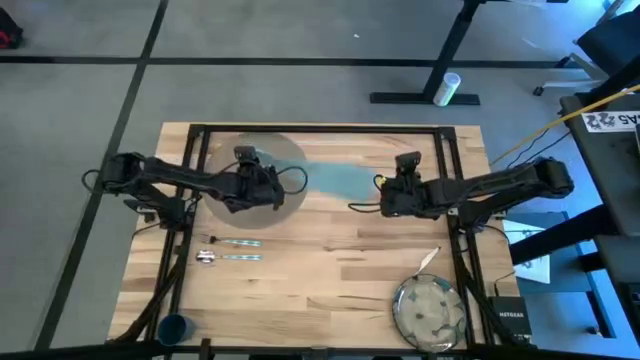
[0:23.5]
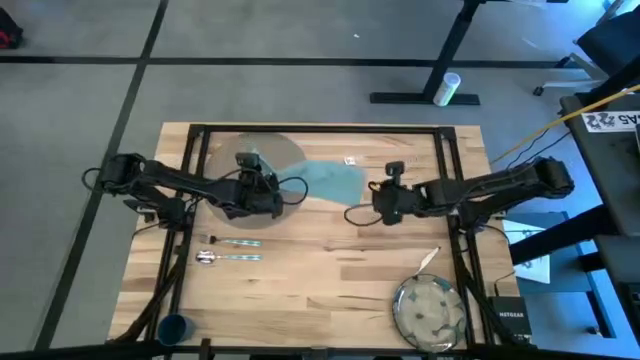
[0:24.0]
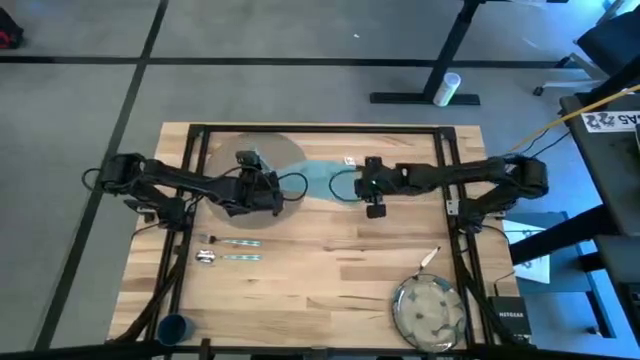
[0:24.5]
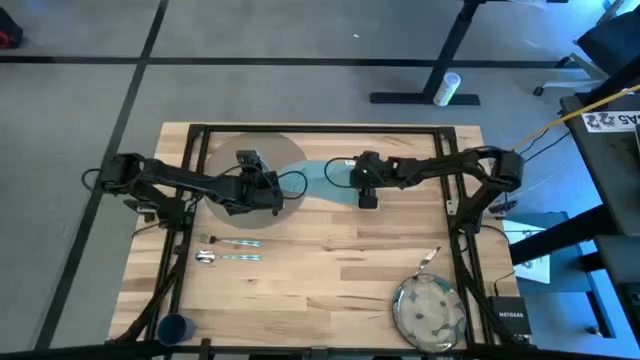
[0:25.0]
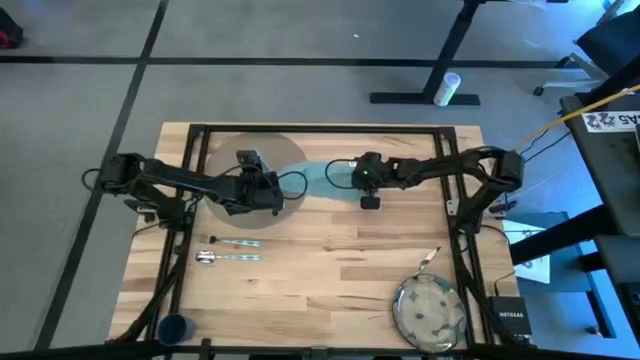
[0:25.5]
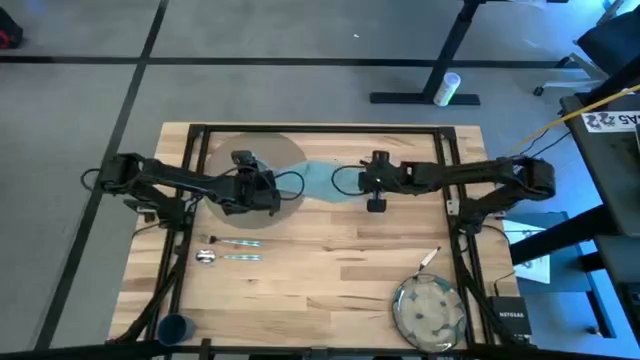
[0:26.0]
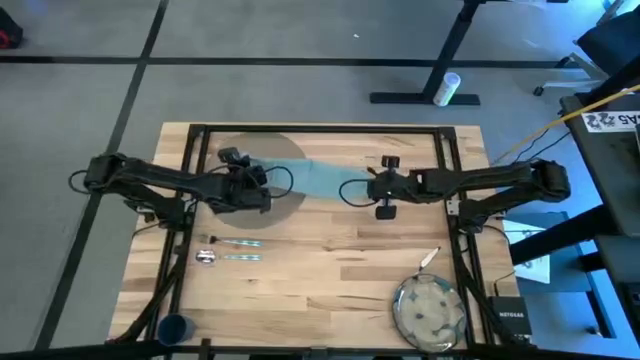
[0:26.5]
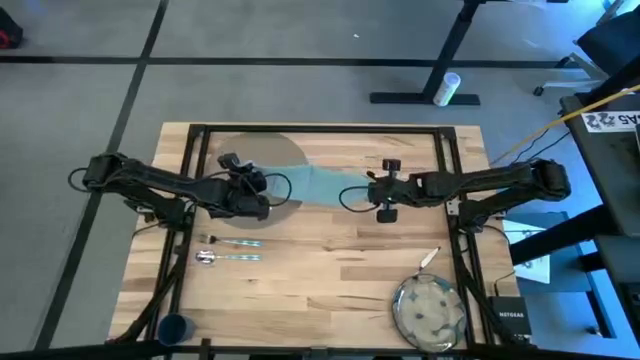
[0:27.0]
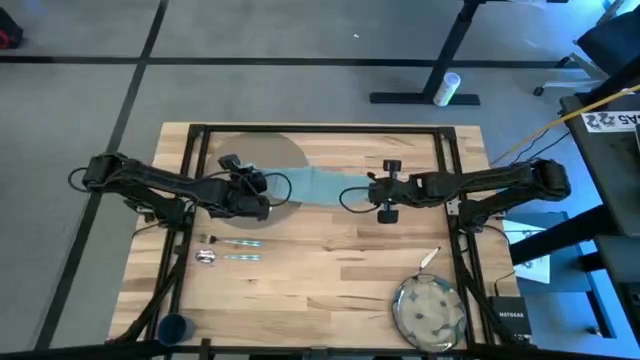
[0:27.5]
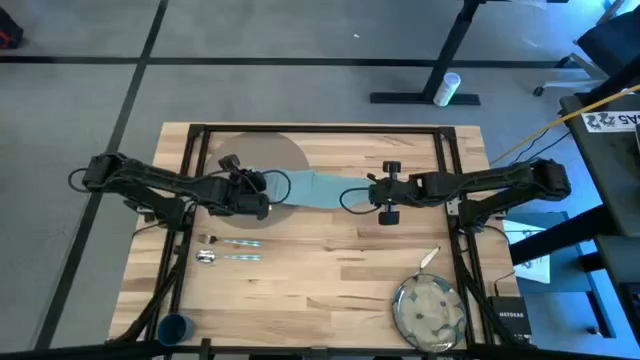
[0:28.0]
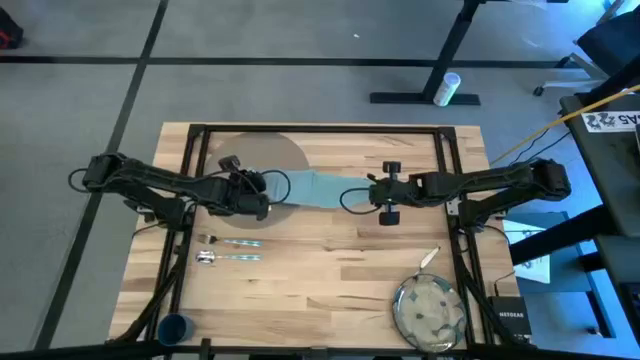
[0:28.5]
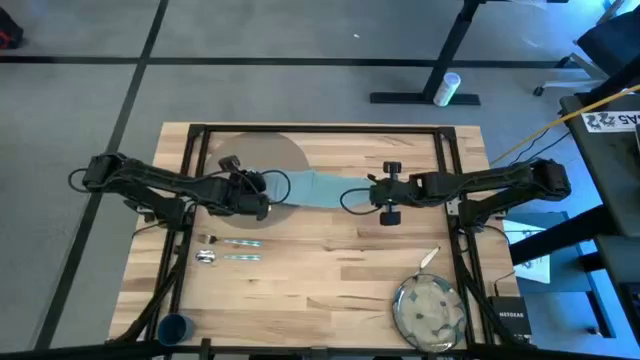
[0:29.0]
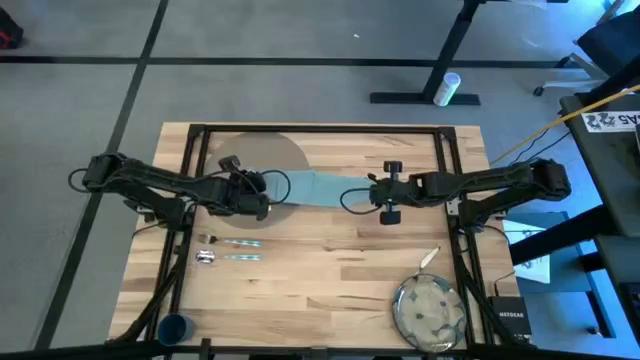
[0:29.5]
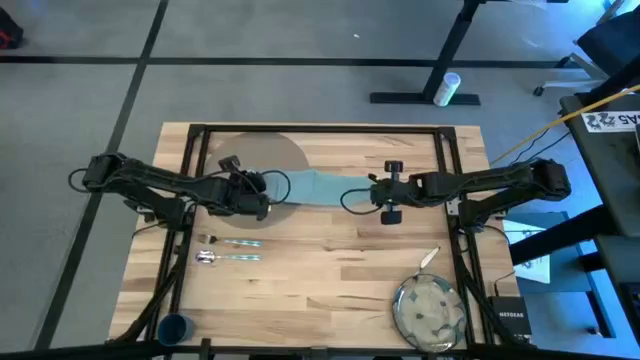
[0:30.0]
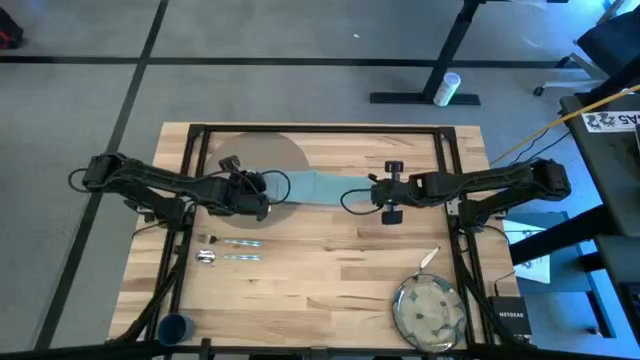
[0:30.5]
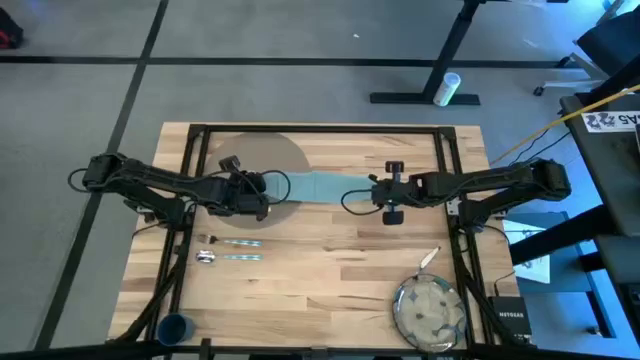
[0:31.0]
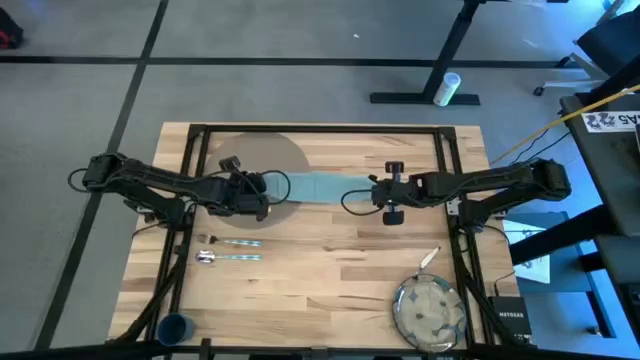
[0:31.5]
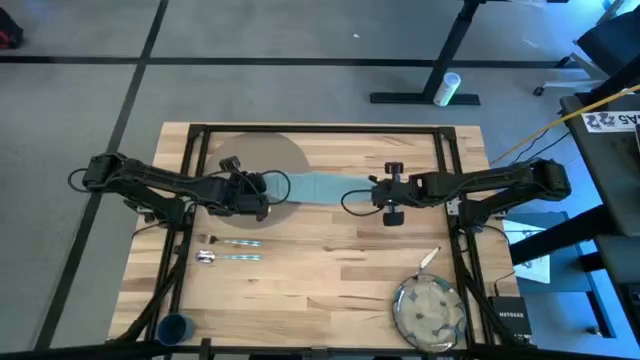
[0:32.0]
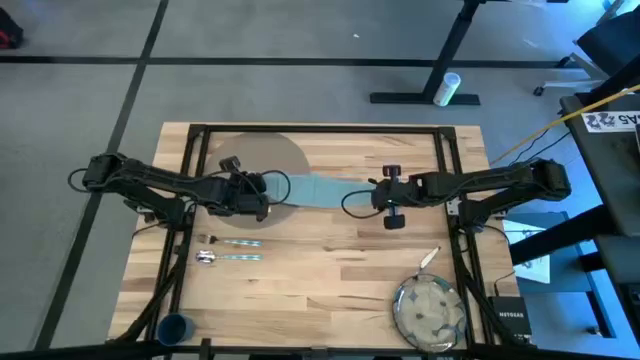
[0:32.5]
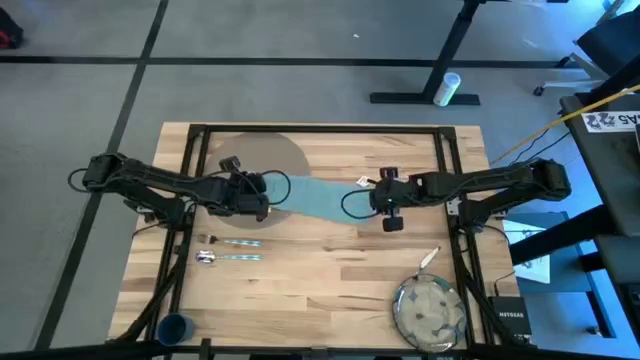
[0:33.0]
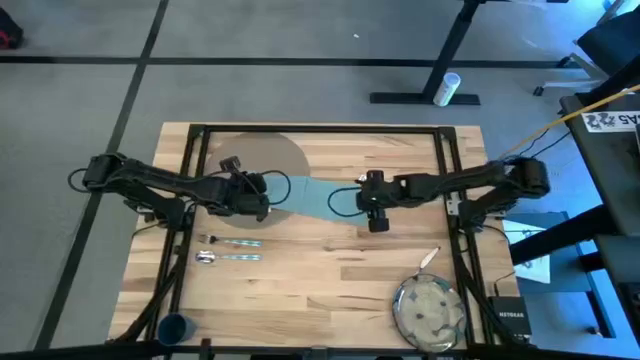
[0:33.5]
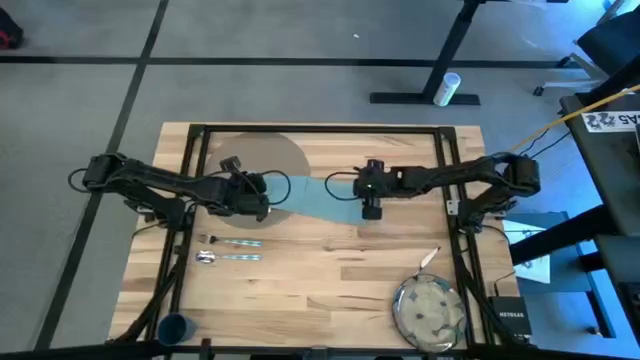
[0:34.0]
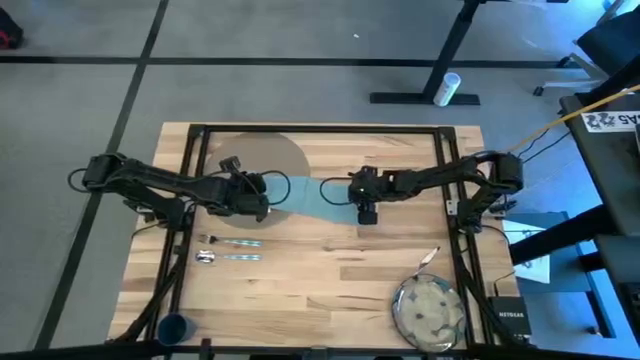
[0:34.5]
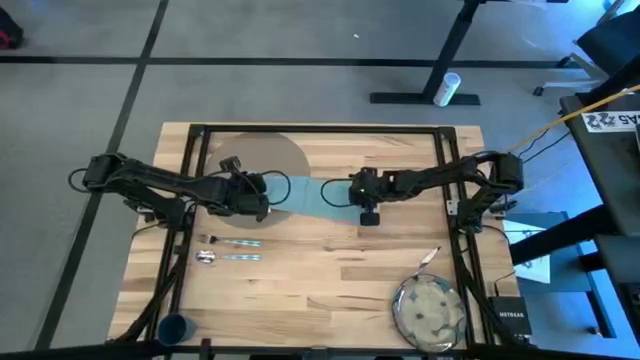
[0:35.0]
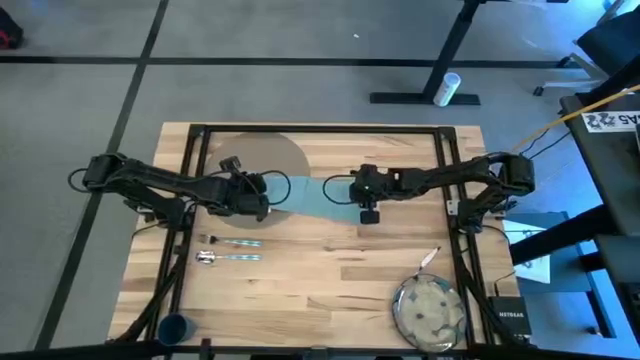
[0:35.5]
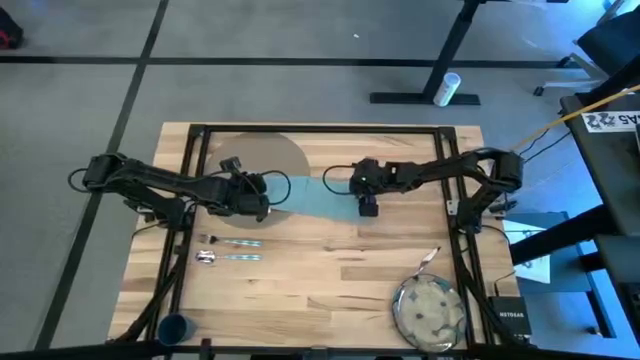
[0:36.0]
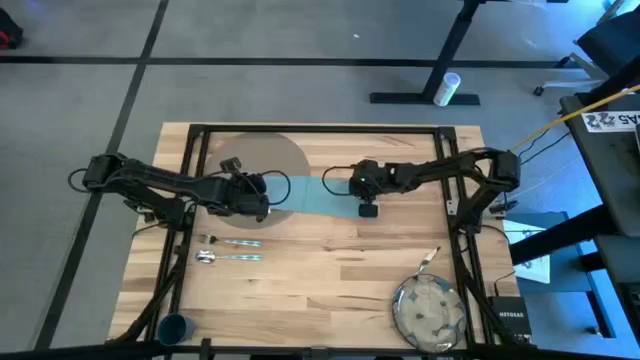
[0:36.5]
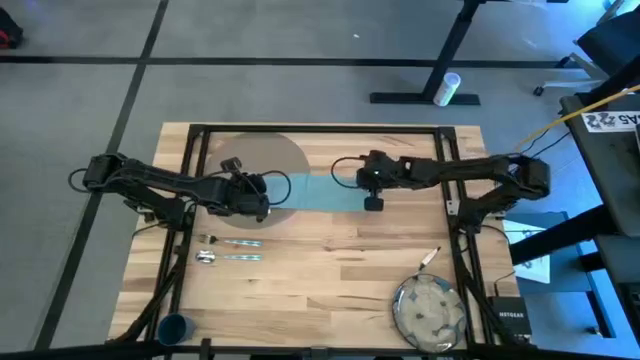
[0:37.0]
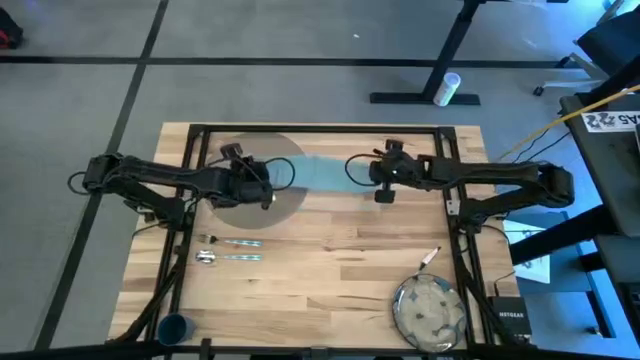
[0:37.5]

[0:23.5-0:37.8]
Task: Set table place
Fold the blue table napkin

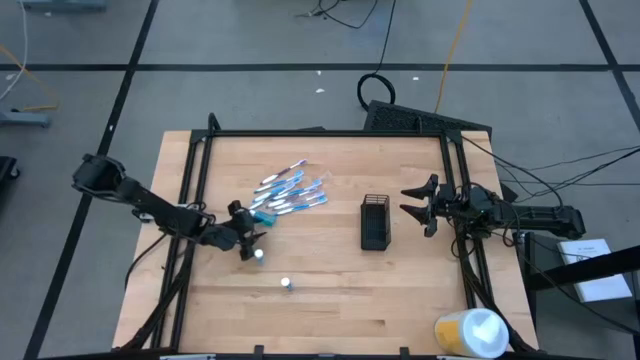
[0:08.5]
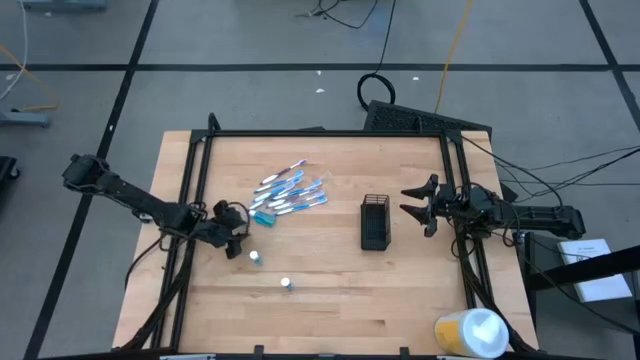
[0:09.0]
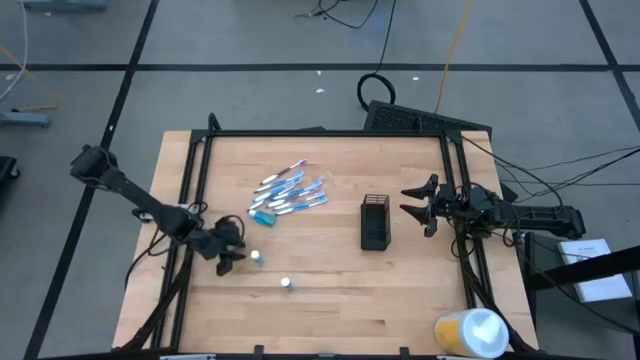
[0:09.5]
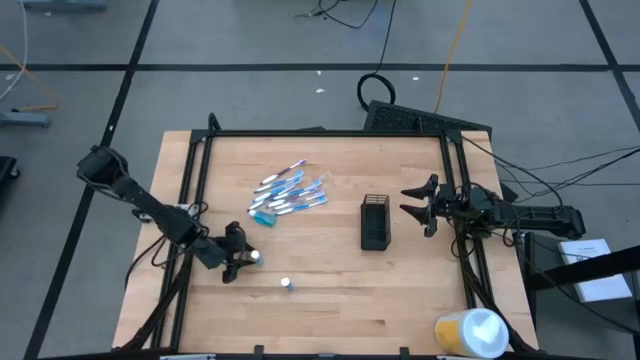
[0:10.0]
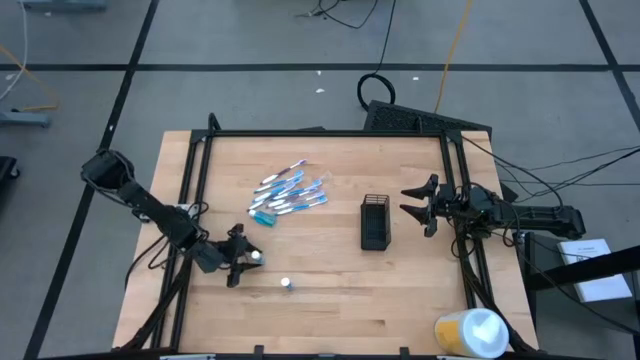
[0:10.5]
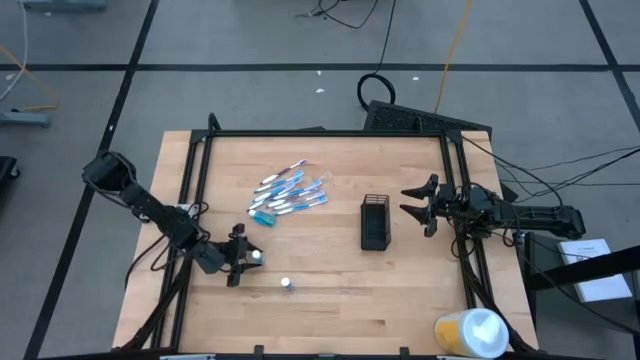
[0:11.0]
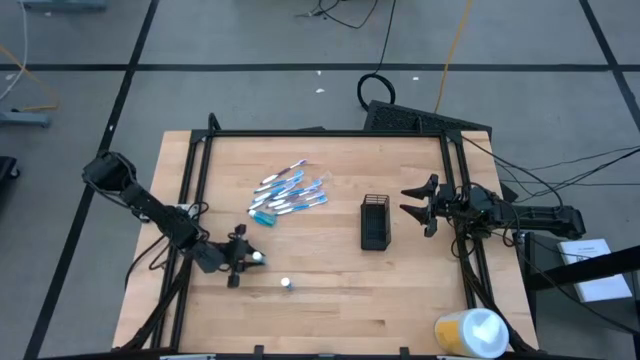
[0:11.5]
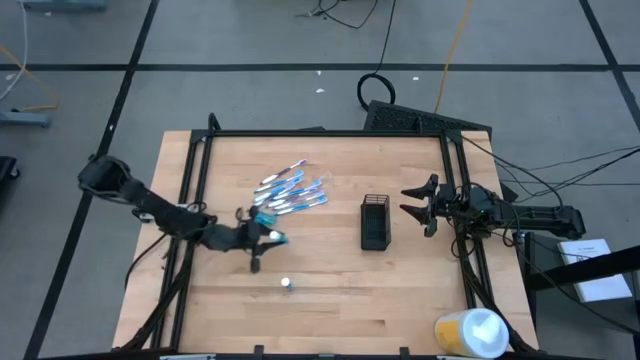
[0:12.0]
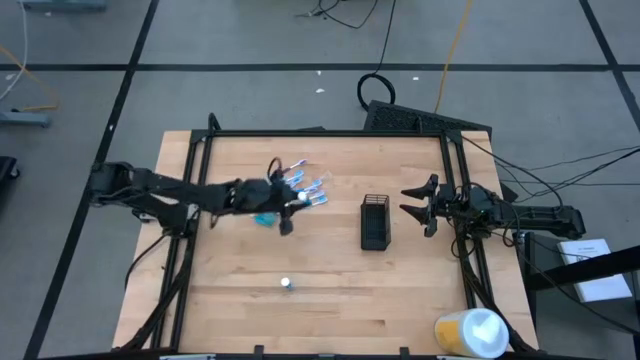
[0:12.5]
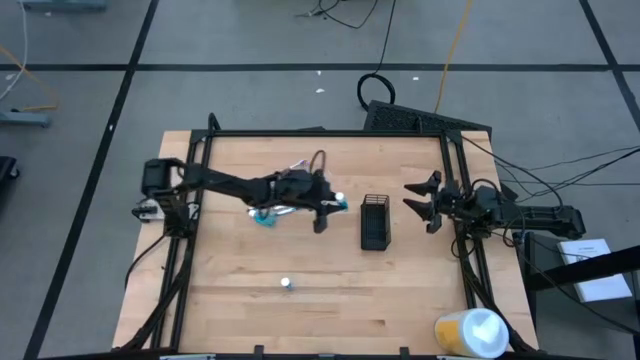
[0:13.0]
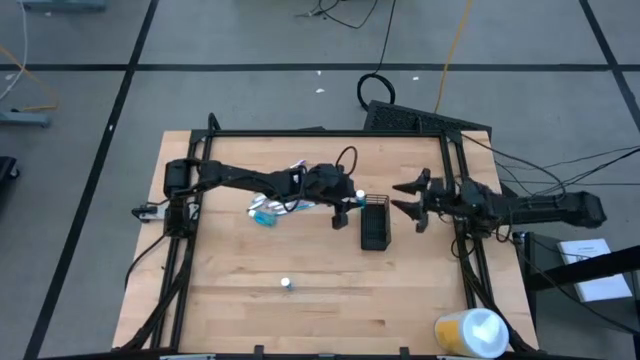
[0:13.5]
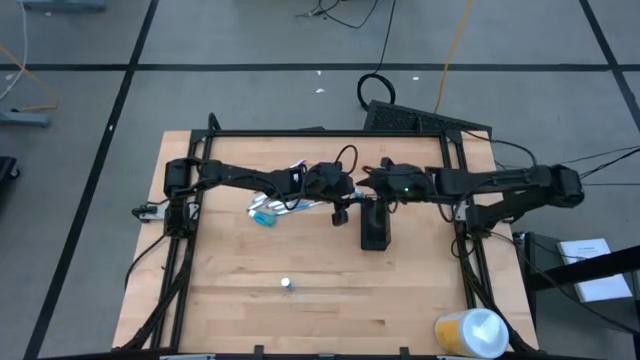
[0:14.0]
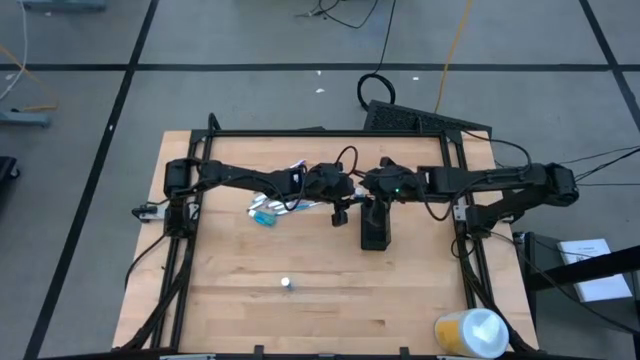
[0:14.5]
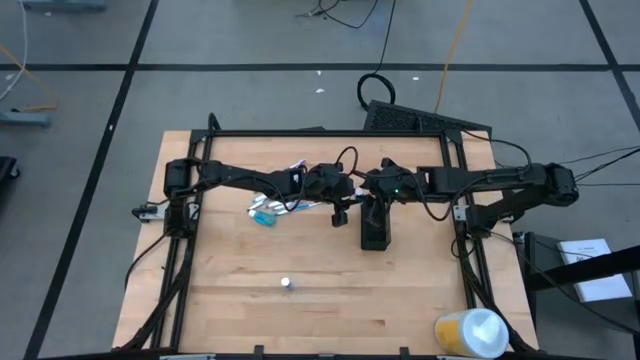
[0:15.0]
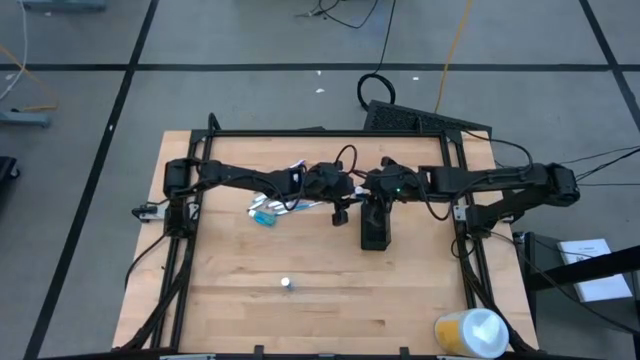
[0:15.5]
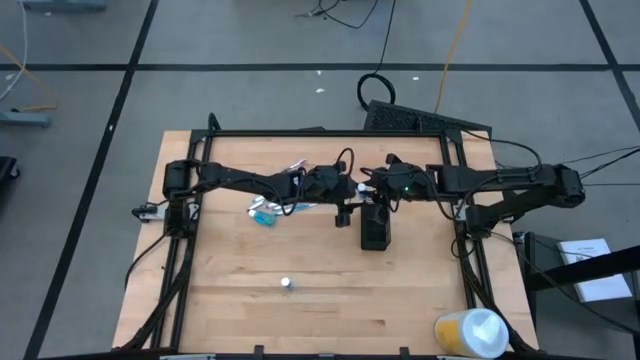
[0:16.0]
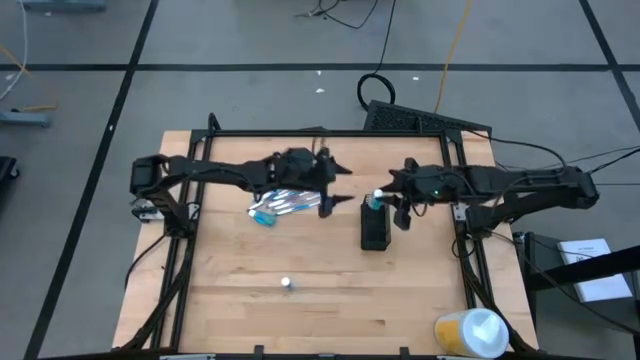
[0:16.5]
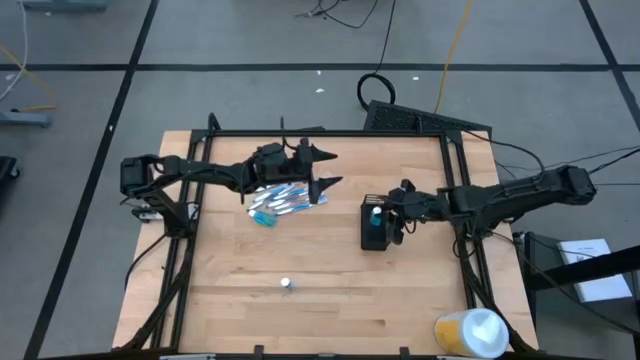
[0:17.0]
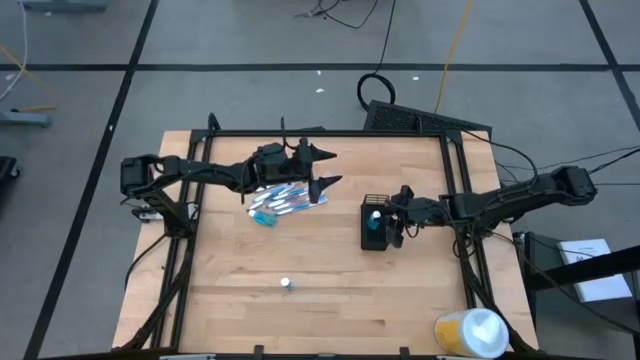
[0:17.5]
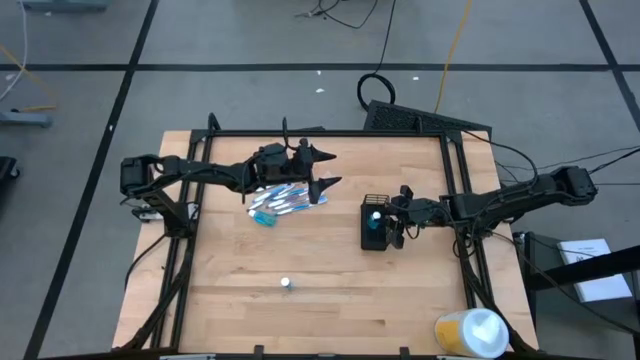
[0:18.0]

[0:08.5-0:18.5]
Task: Pick & Place toothbrushing station
Put the mouthwash into the middle section of the mesh organizer
